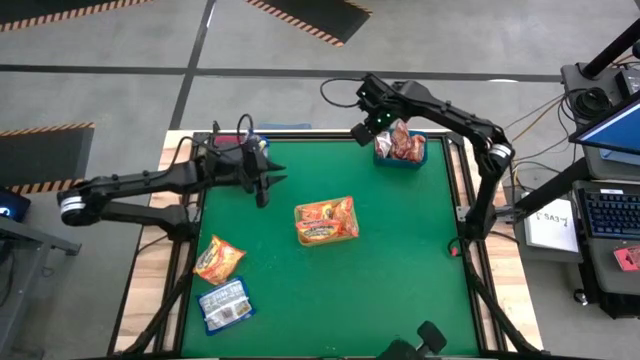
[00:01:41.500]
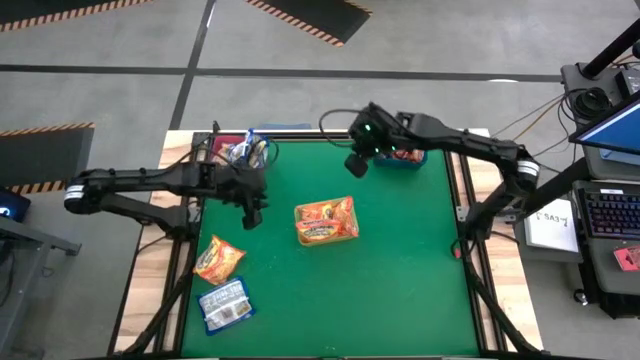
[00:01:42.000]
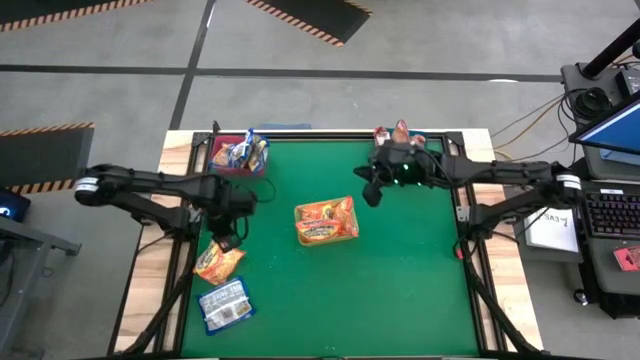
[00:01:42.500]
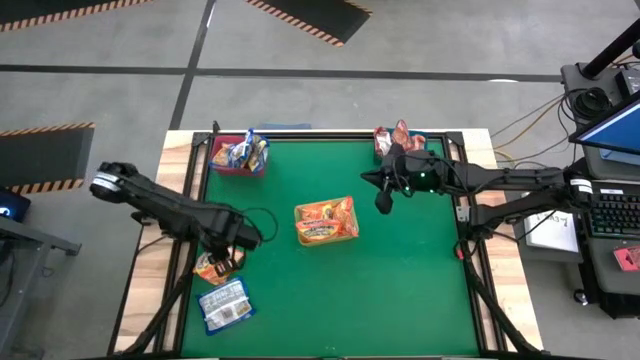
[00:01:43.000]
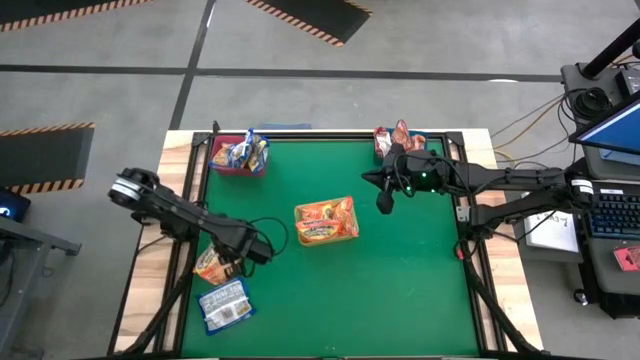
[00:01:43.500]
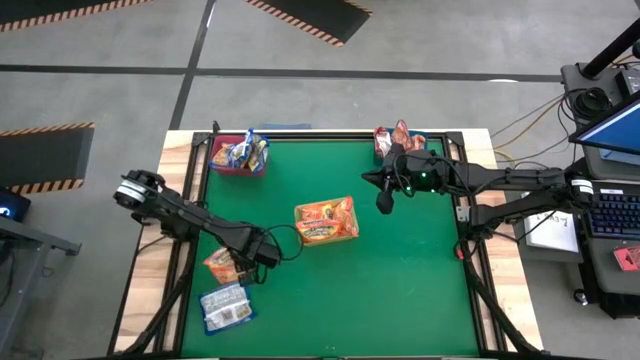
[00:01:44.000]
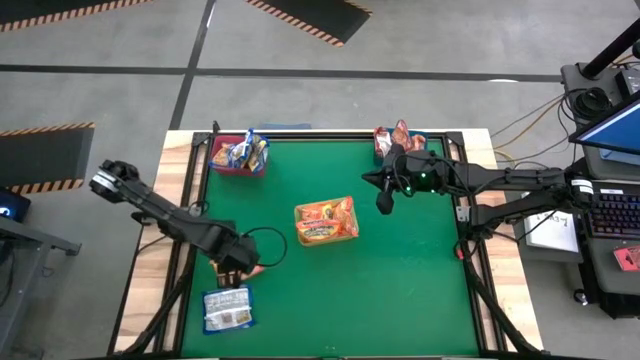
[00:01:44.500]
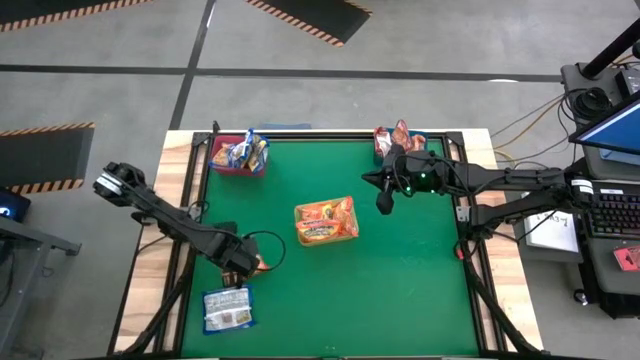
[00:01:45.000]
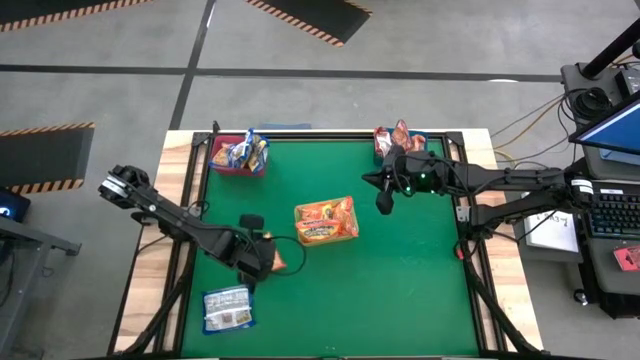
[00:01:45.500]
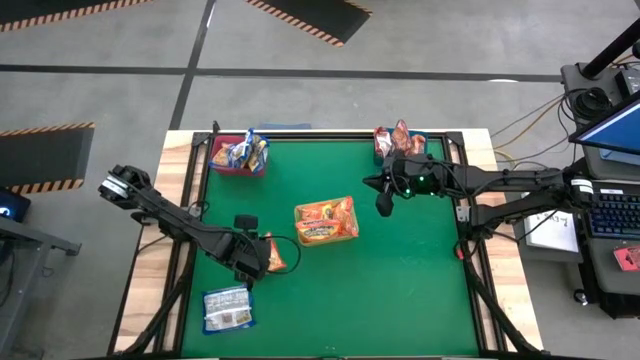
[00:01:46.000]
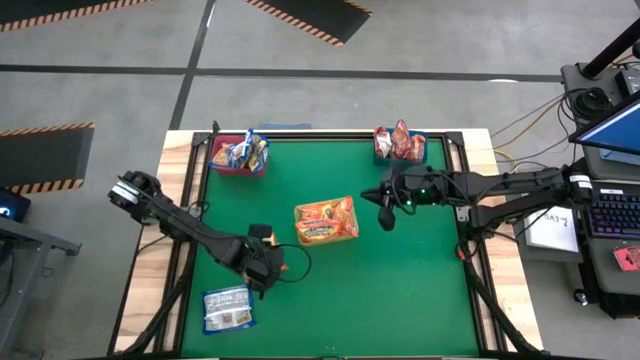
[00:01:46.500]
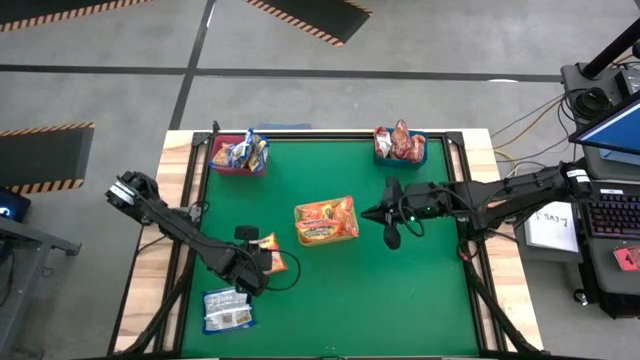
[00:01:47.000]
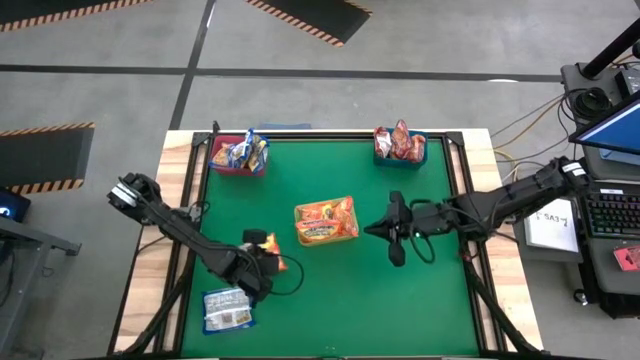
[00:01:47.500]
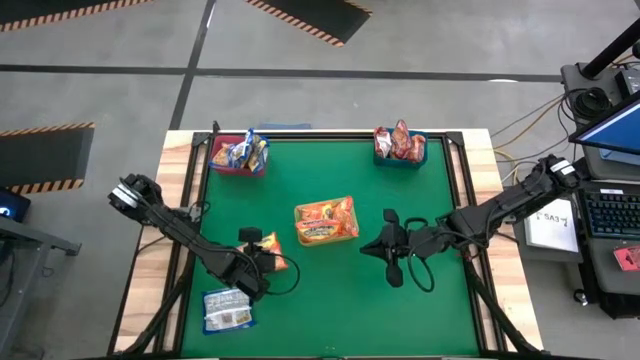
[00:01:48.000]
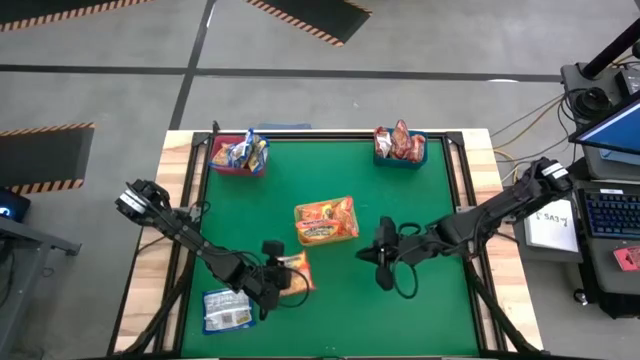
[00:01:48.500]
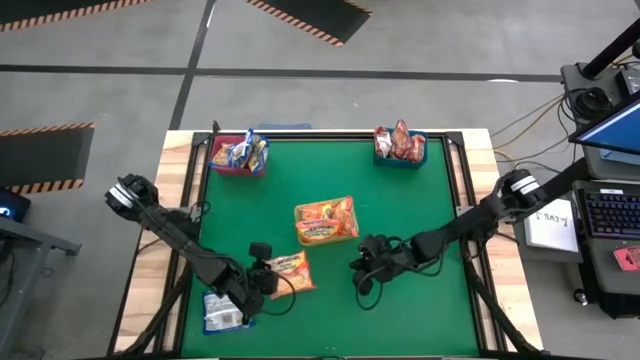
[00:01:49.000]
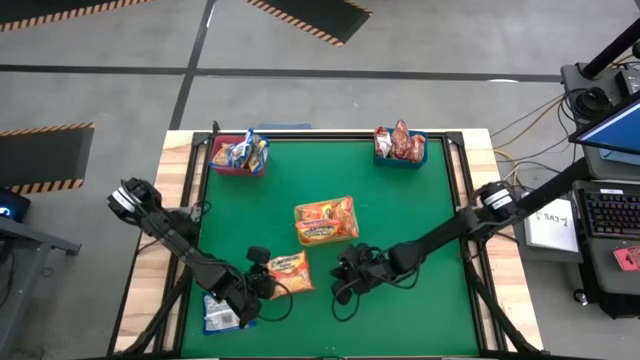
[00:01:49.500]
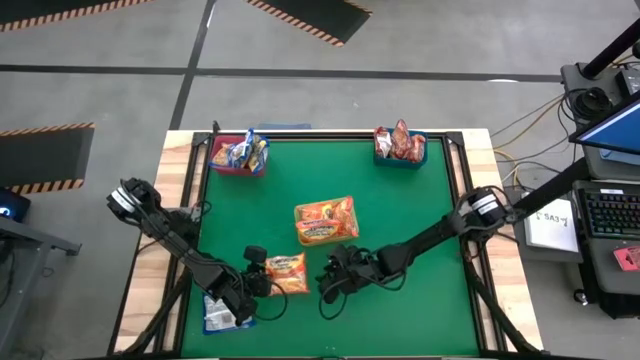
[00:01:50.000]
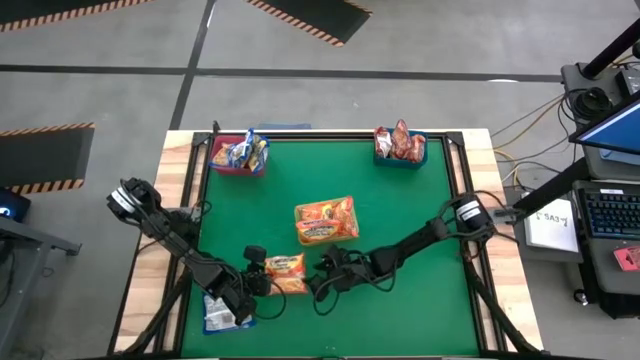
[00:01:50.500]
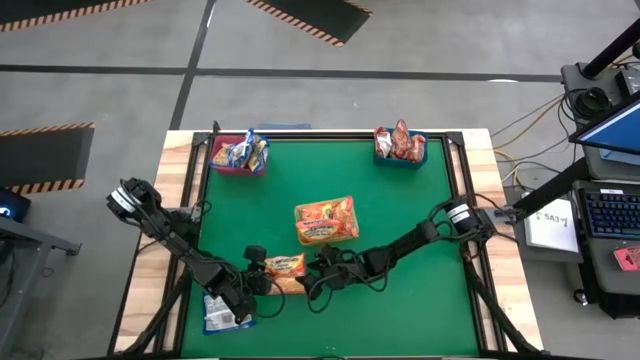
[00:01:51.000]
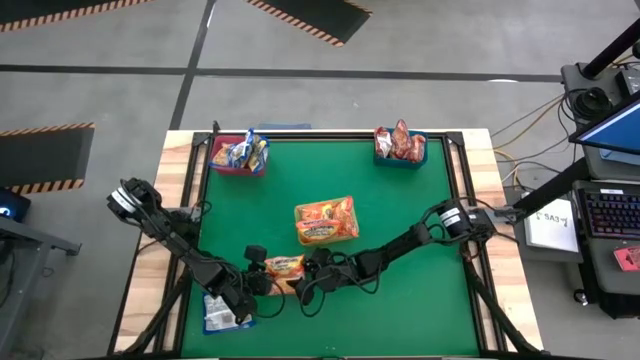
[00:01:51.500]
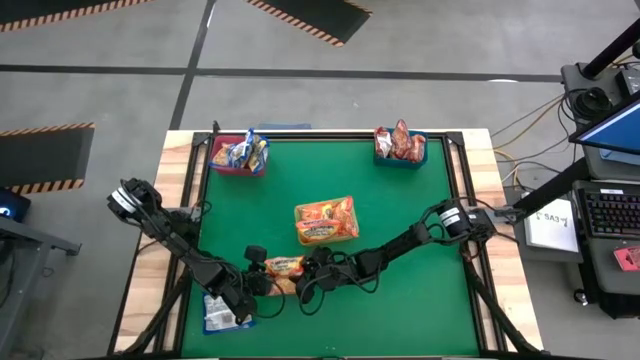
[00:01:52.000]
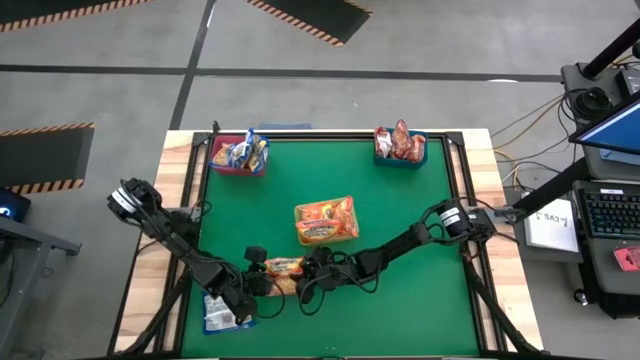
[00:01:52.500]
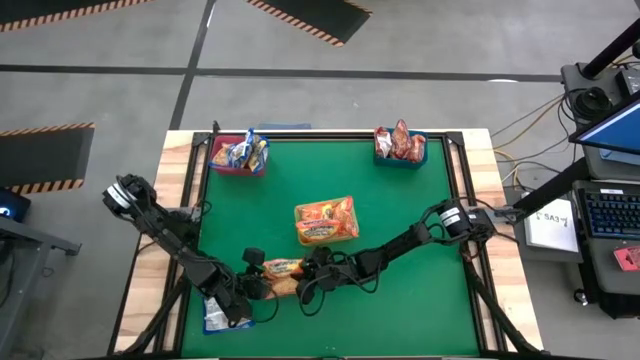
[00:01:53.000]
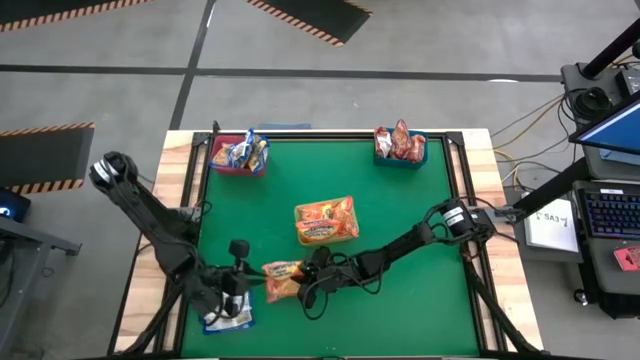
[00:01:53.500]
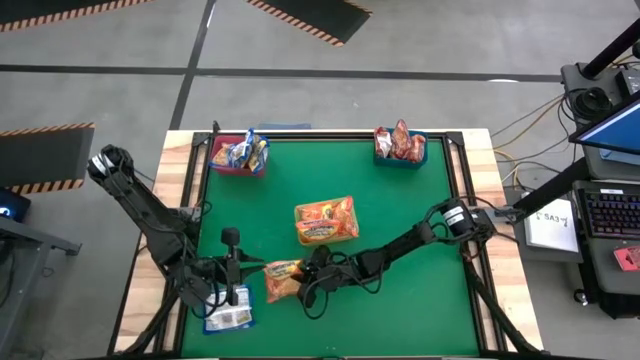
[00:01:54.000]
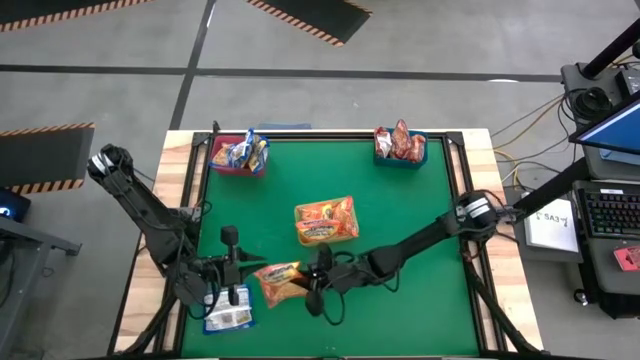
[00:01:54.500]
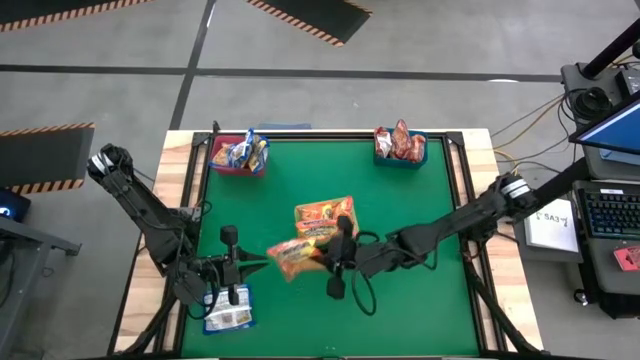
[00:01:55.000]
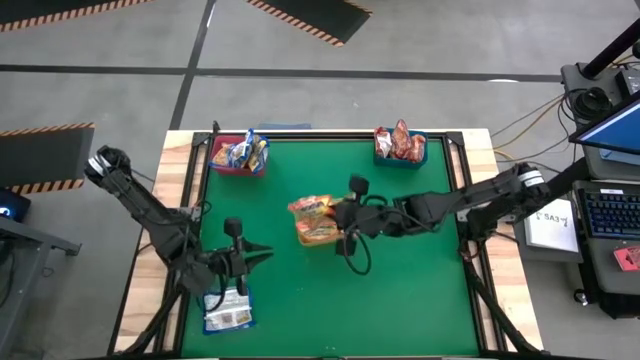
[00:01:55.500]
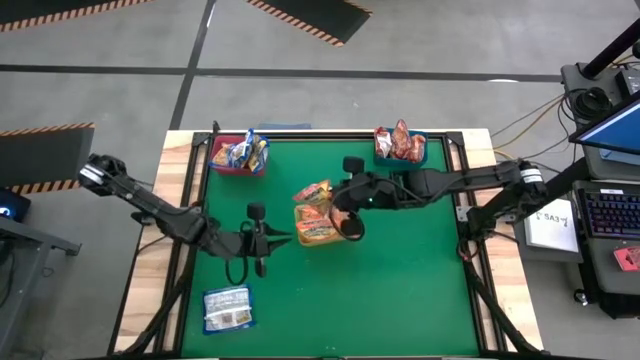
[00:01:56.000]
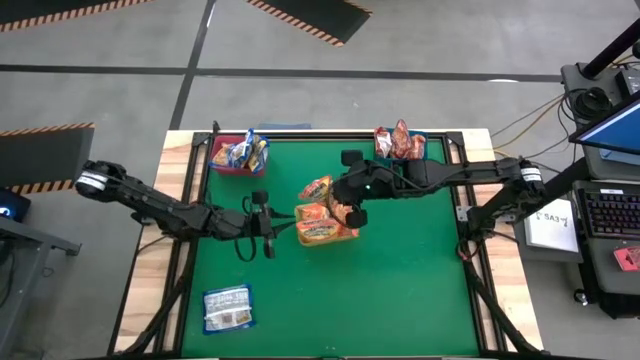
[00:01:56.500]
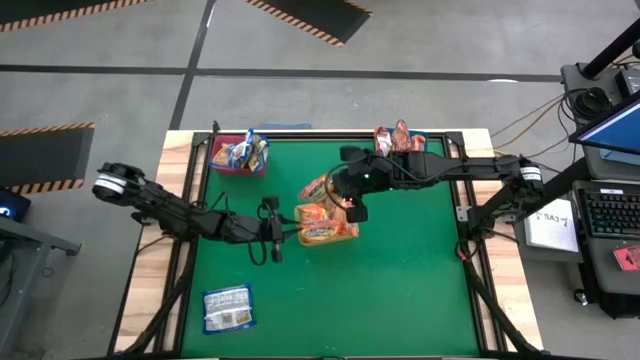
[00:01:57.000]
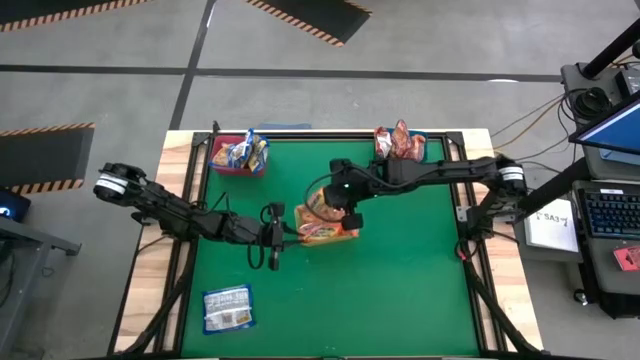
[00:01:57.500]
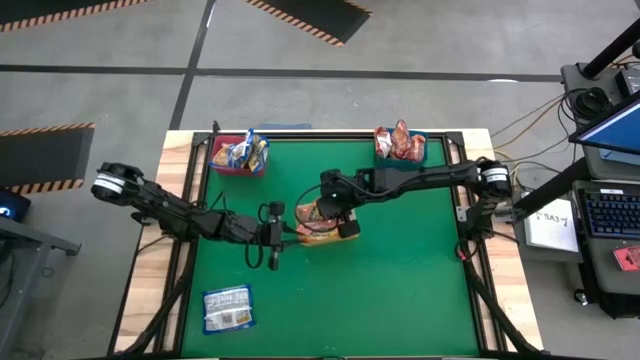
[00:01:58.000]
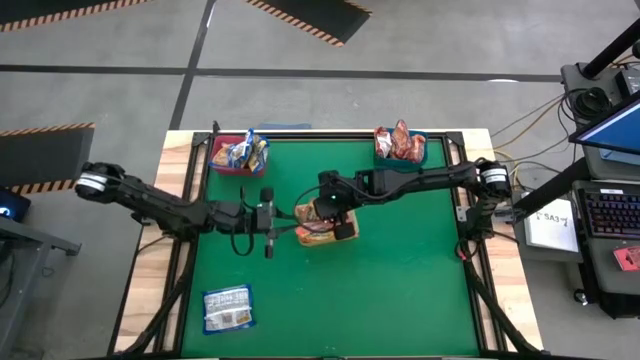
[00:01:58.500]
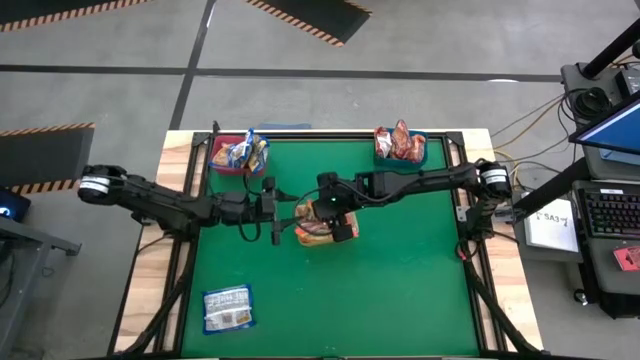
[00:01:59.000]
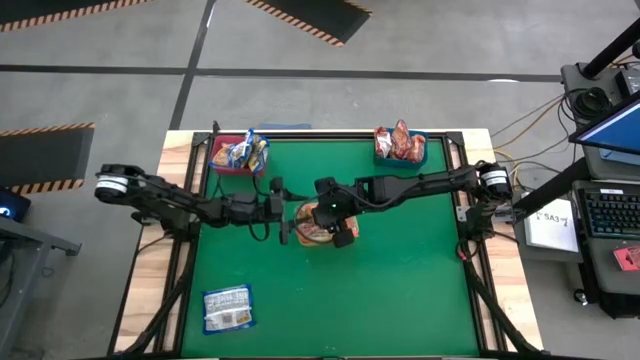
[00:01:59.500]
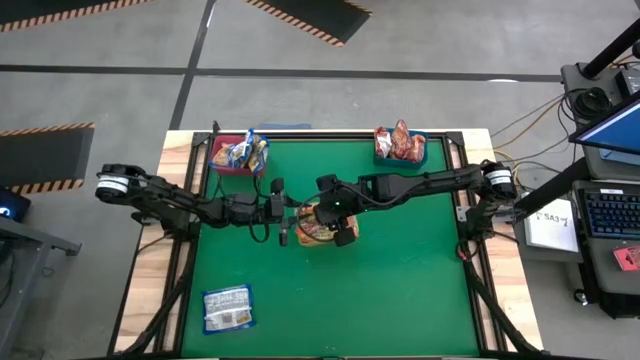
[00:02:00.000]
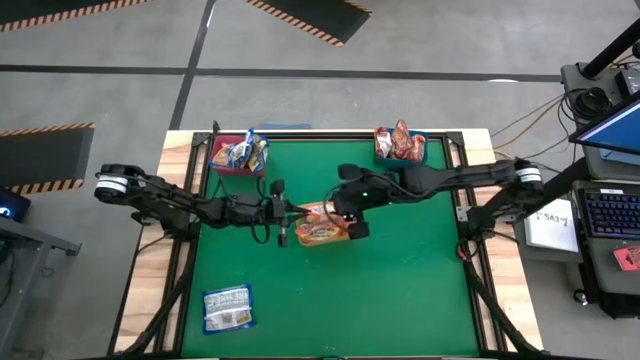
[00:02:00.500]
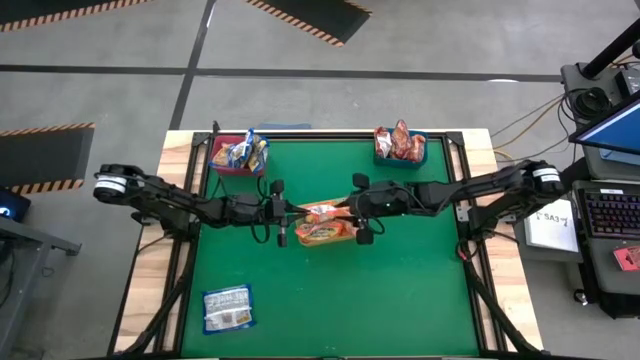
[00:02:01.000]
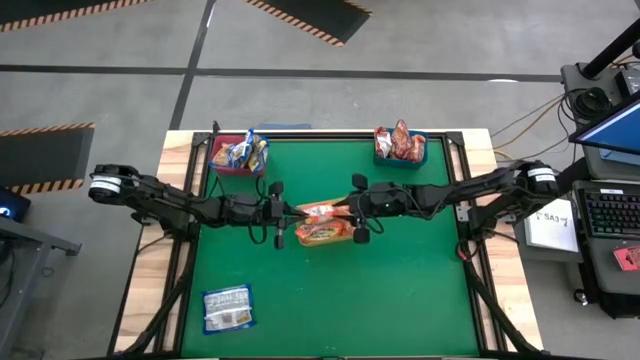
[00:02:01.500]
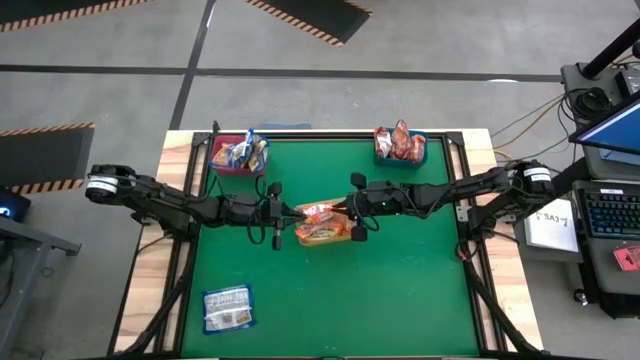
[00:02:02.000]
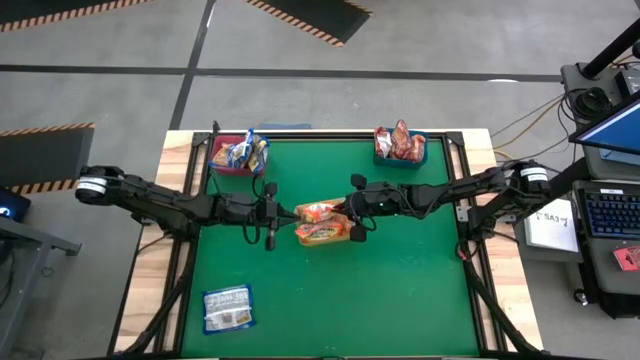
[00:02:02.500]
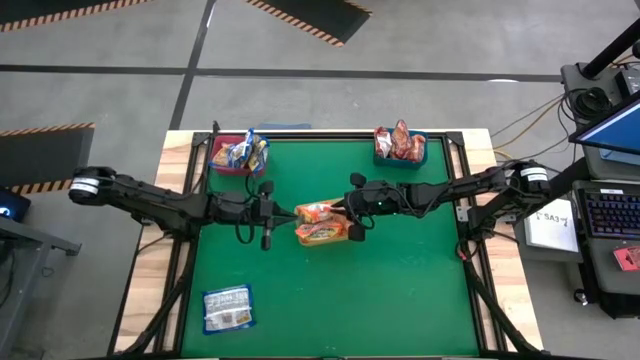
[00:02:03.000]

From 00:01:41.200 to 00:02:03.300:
Task: Sort Maruchan noodles
Put the orange noodle pack into the yellow bin
